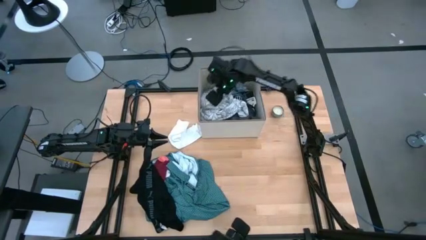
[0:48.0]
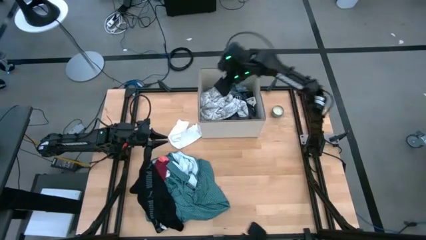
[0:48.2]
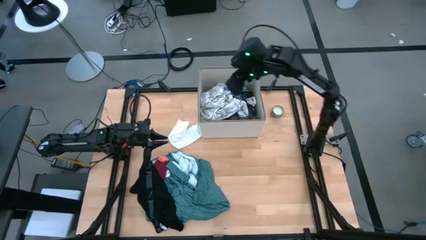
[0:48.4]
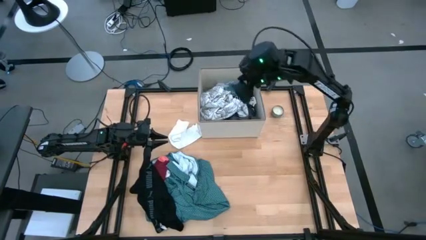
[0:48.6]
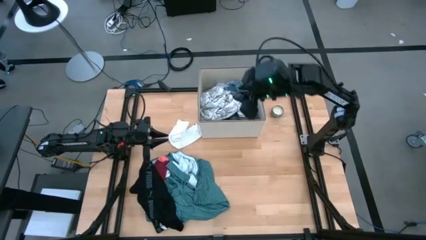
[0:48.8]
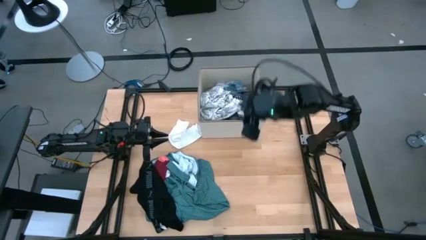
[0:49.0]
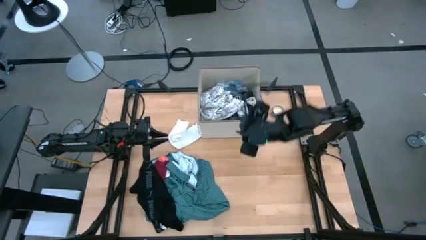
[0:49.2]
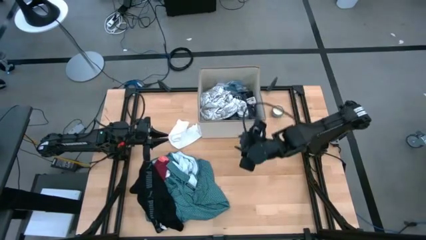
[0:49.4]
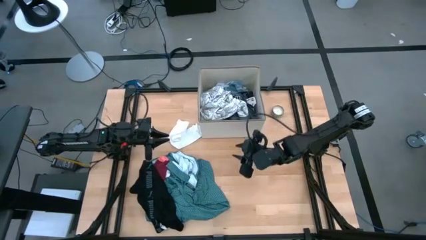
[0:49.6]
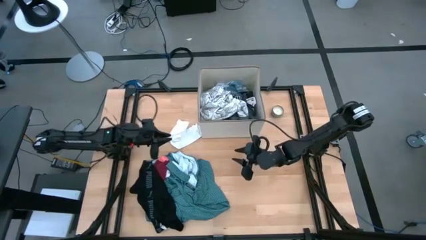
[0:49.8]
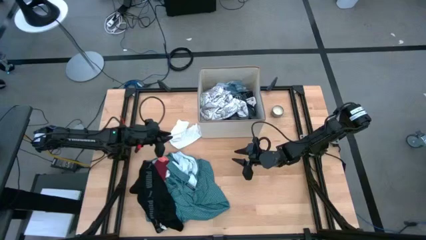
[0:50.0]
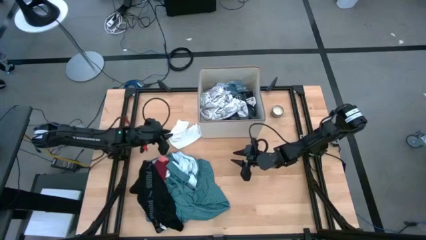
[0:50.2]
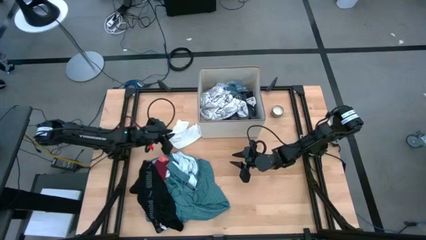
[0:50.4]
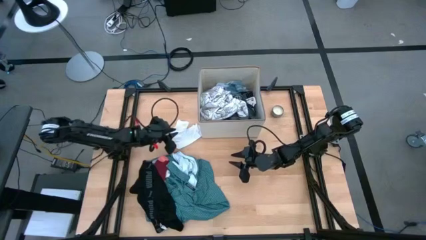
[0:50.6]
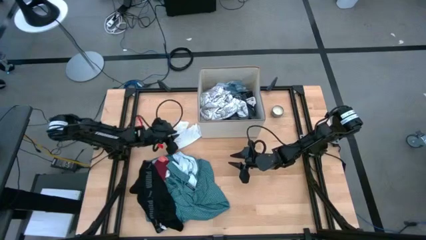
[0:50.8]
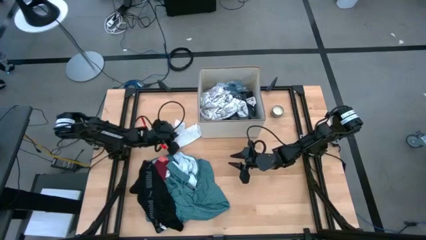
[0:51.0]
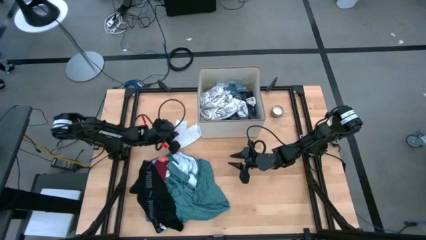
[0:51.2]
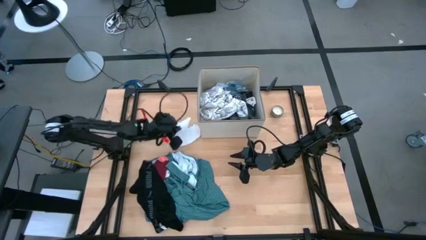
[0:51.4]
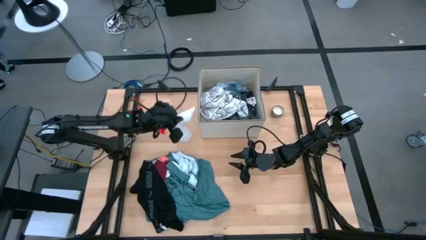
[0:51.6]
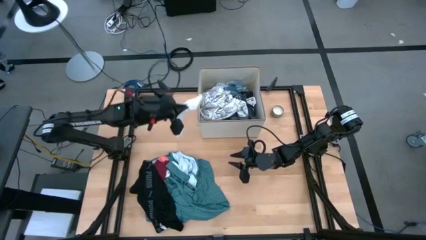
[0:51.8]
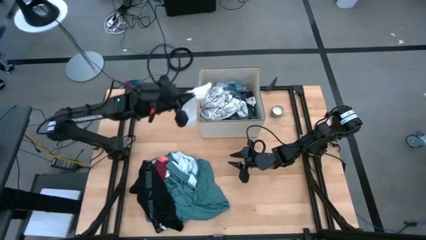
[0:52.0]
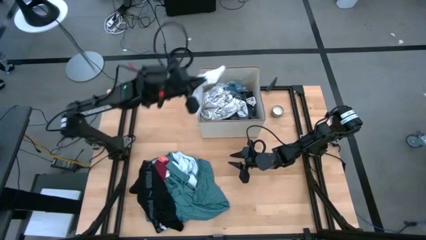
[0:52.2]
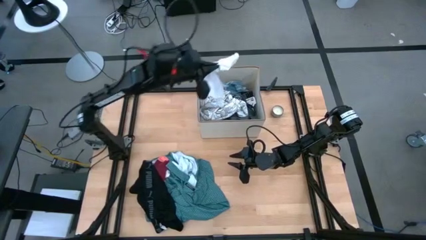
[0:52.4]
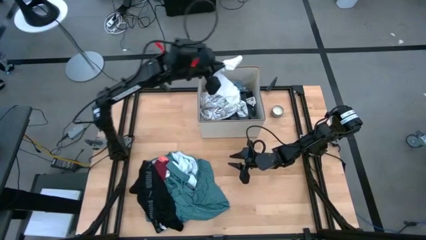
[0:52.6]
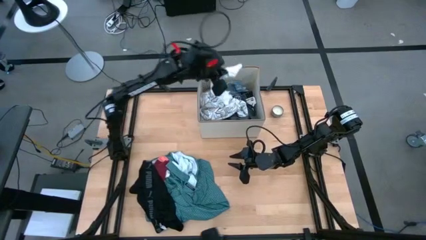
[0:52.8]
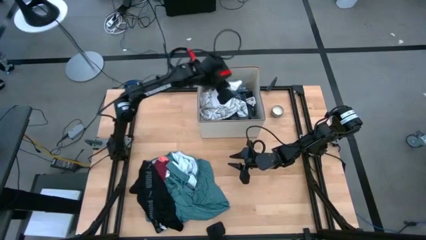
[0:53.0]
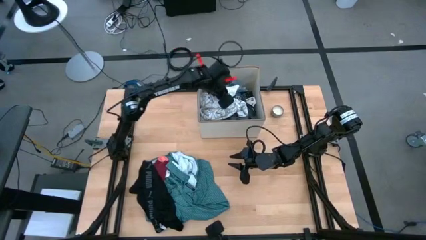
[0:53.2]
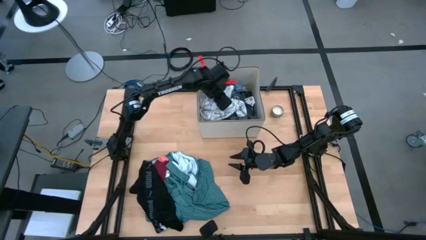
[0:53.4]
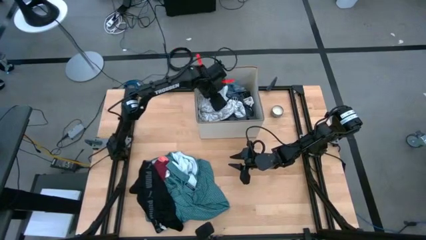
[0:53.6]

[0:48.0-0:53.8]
Task: Sort clothes
Put the white sock into the bin

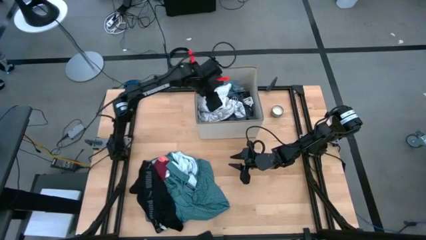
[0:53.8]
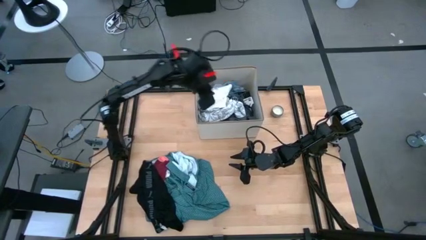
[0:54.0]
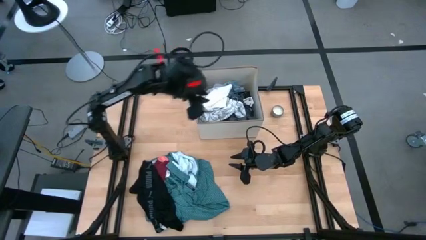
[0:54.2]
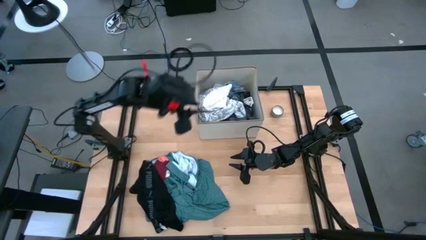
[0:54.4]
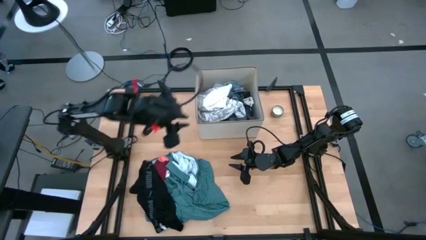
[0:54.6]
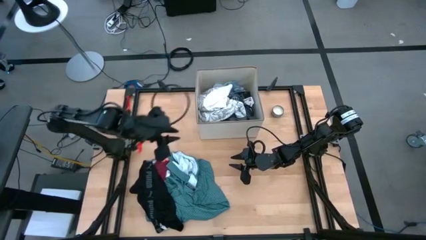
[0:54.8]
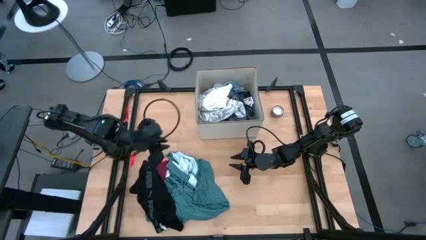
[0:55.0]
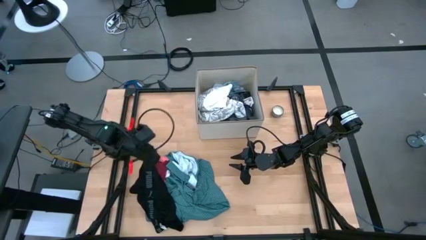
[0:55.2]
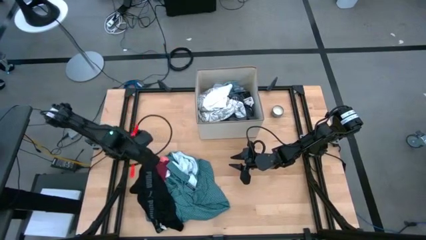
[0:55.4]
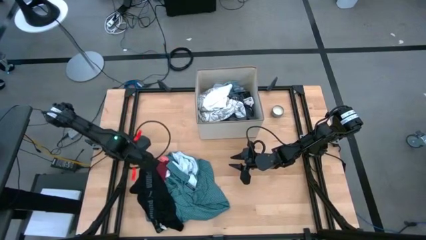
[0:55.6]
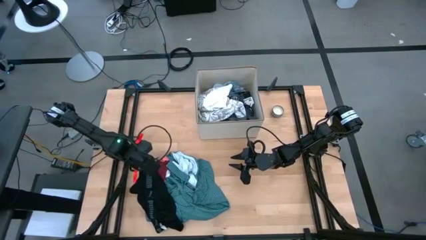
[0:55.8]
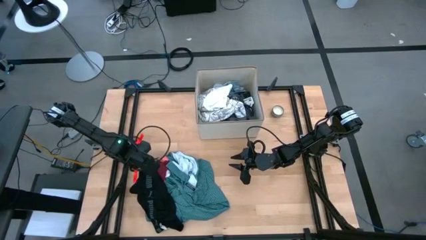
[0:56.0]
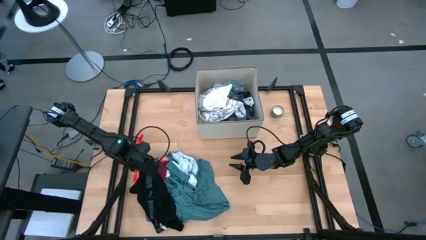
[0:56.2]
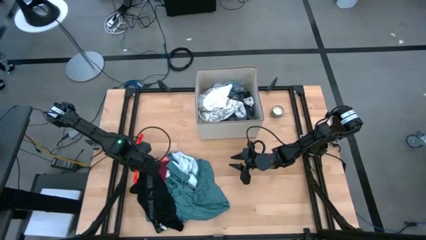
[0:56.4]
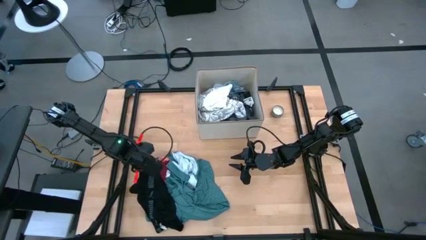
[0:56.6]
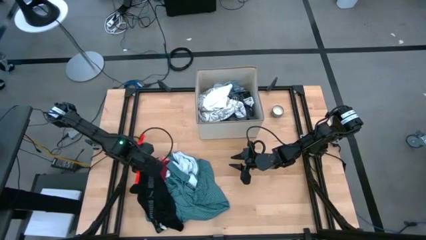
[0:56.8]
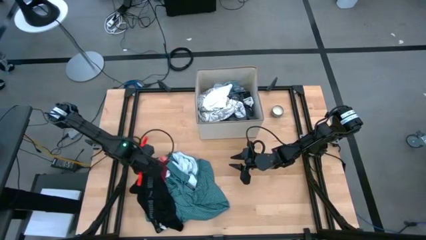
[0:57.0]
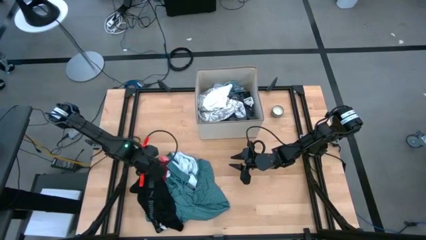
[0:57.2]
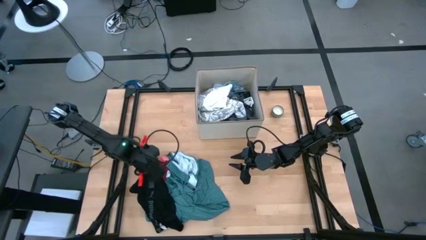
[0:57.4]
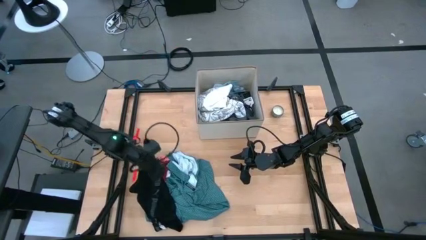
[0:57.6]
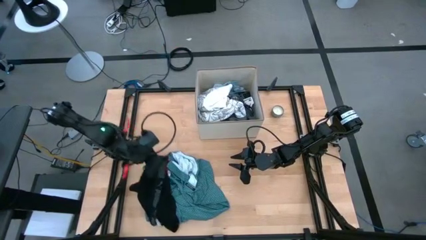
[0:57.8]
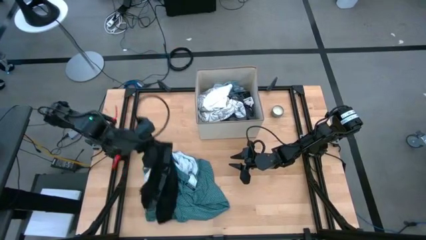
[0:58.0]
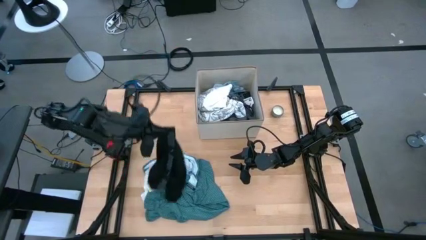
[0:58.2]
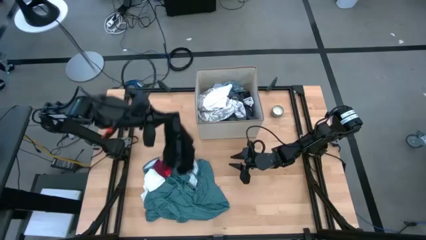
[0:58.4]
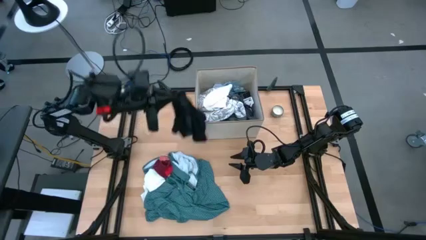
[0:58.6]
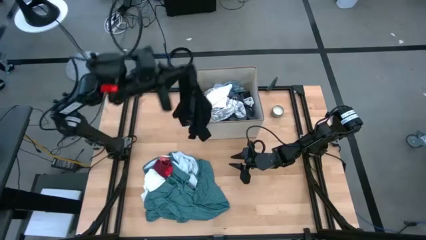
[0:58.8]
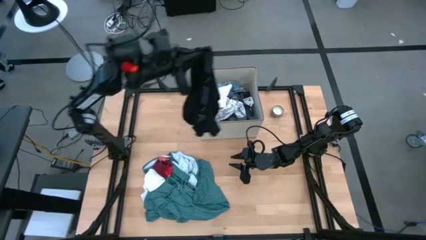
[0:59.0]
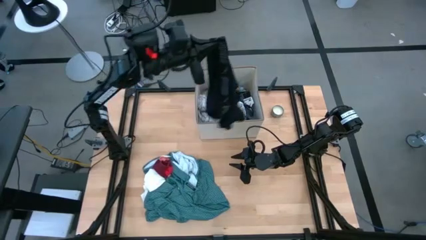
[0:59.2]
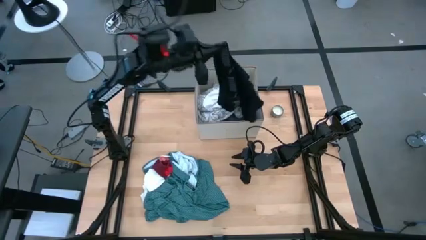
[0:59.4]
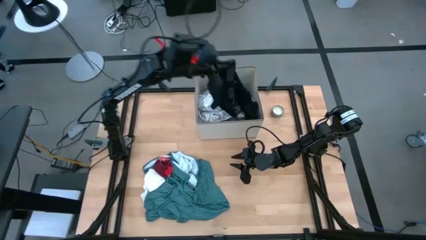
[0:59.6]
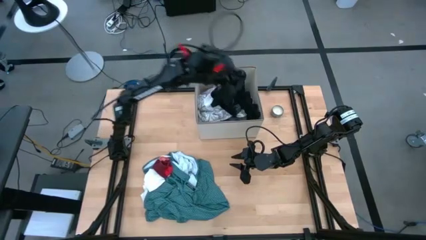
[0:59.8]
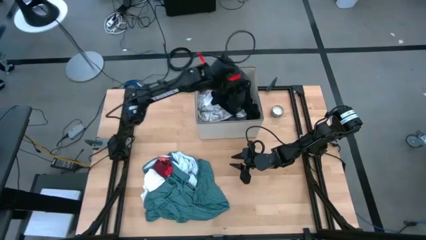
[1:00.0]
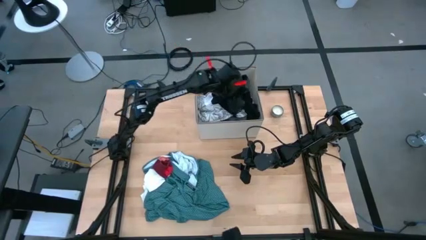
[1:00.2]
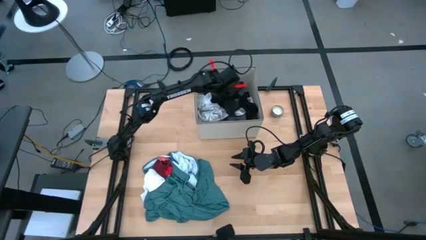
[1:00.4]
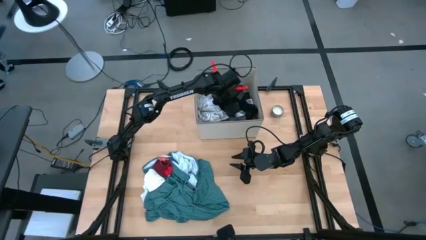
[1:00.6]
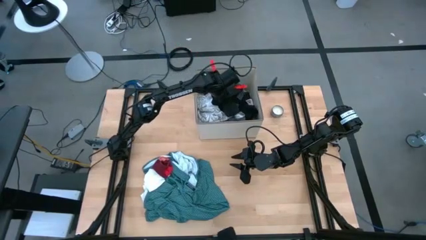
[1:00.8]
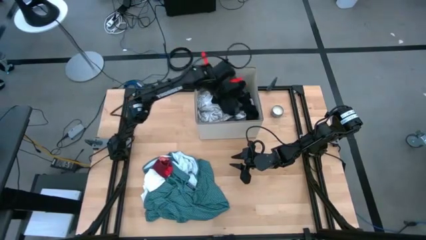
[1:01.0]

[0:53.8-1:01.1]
Put the black boxer into the bin

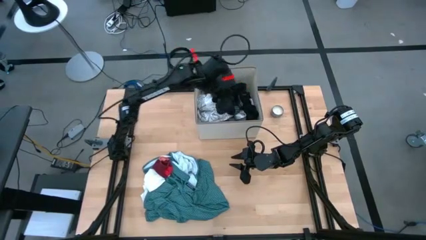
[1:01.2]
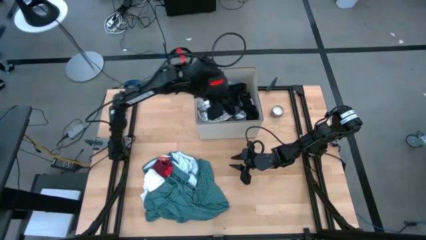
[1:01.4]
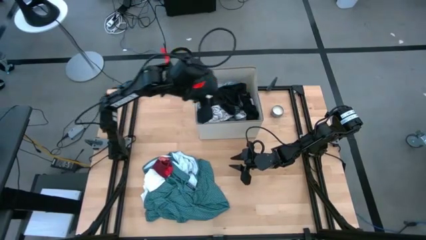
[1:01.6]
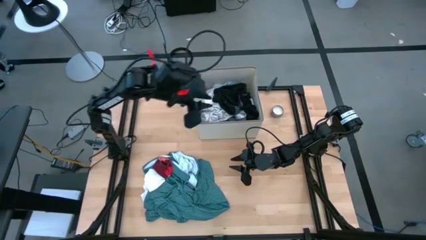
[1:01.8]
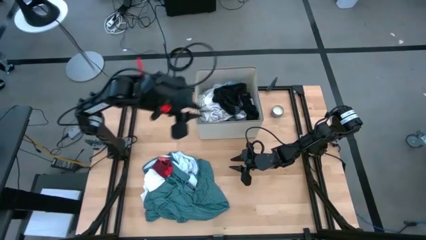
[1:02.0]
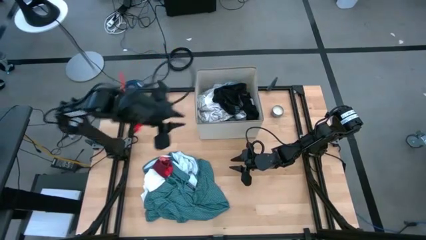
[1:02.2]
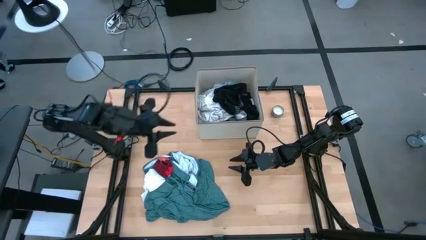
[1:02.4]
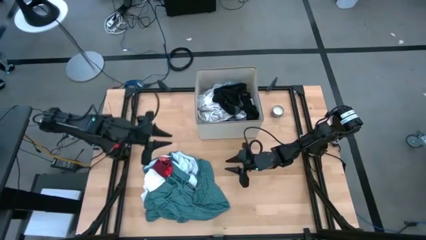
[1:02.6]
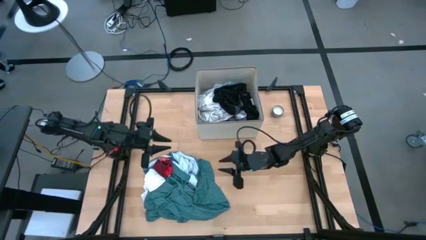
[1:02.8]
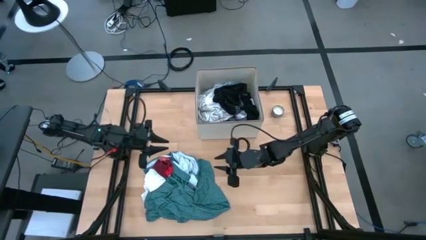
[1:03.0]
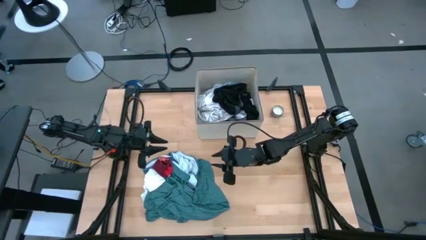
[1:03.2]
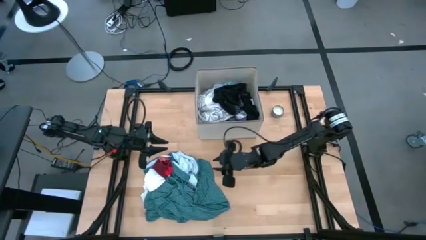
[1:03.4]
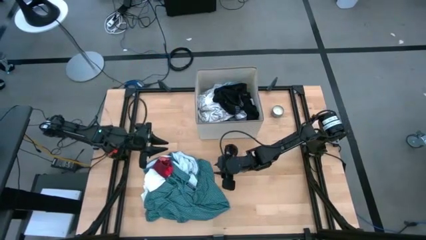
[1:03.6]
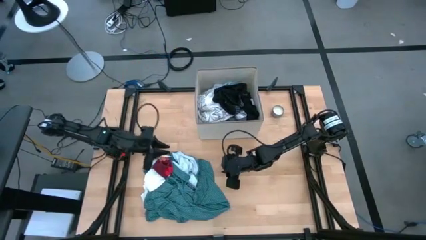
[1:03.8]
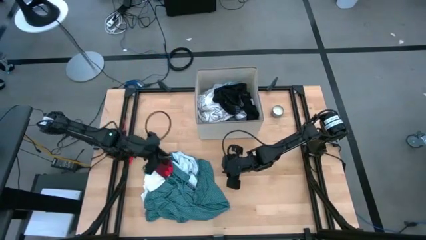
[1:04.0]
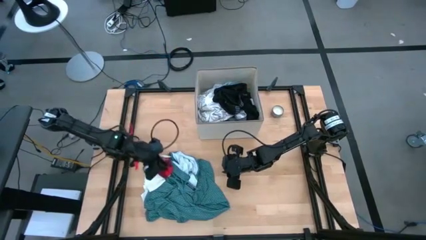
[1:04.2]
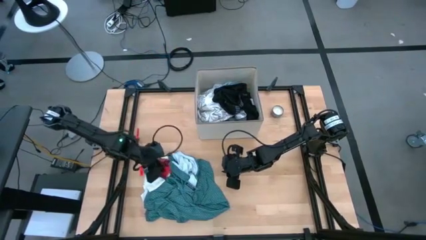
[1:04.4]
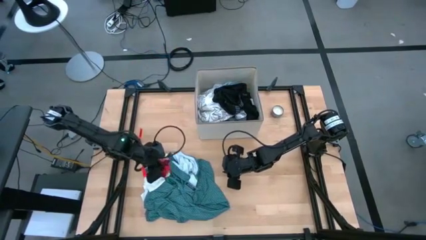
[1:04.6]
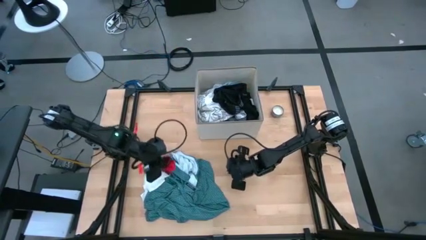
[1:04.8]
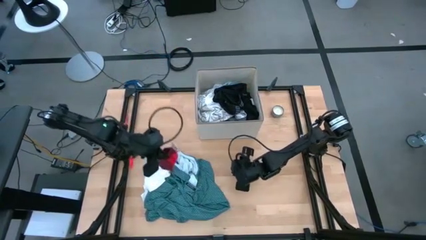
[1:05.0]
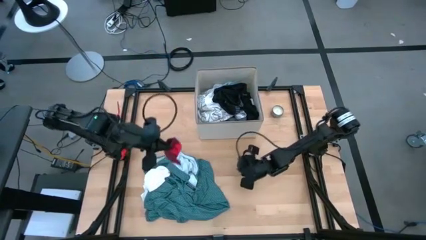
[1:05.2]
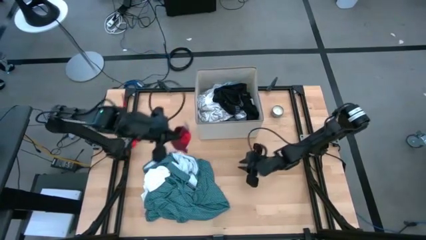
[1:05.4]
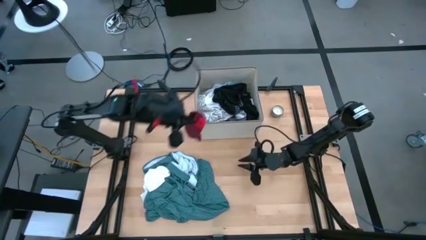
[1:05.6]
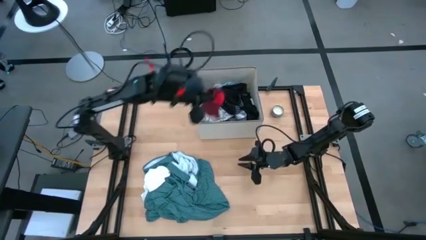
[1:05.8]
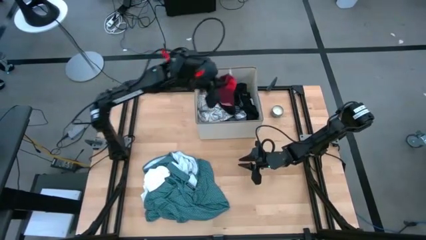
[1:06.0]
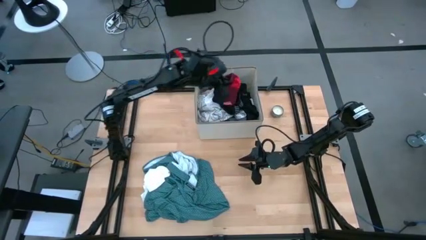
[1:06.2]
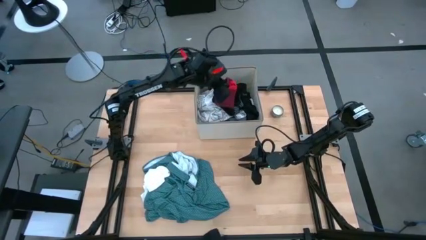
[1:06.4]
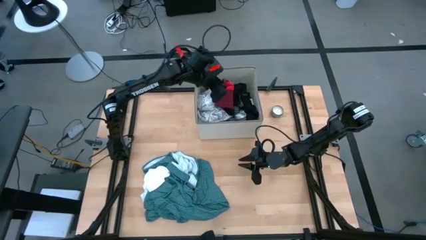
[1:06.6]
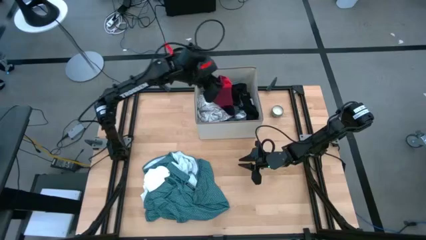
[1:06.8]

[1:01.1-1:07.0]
Put the red sock into the bin
